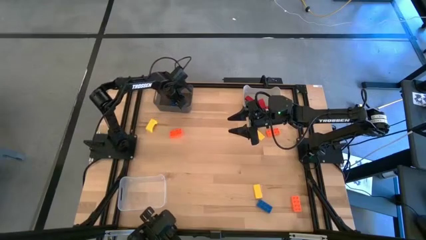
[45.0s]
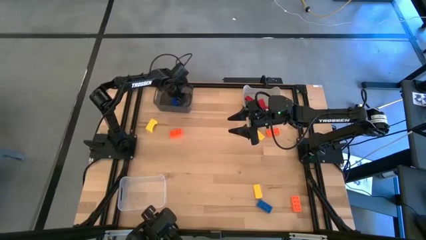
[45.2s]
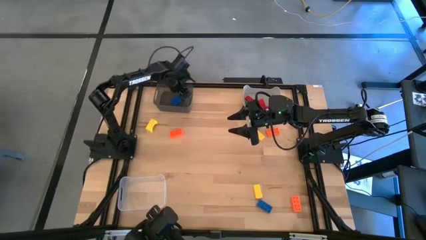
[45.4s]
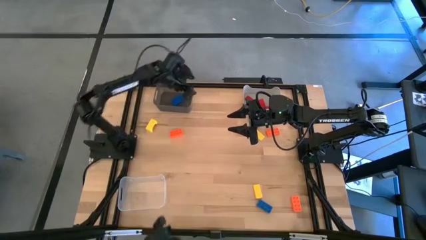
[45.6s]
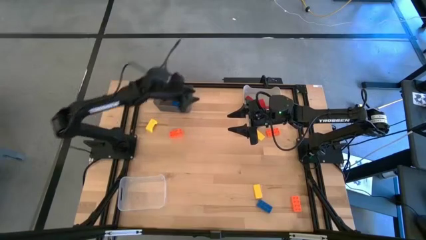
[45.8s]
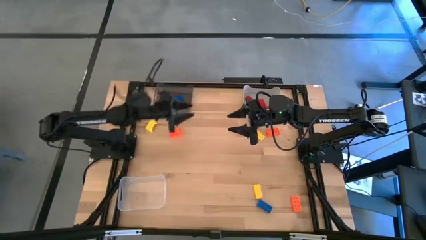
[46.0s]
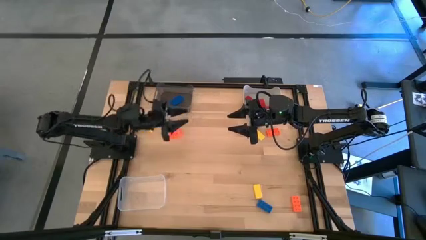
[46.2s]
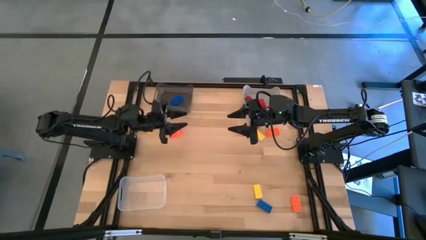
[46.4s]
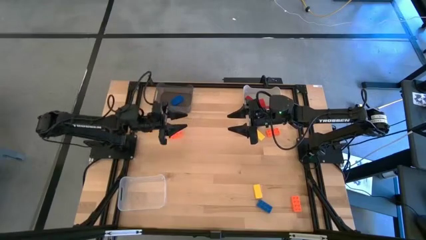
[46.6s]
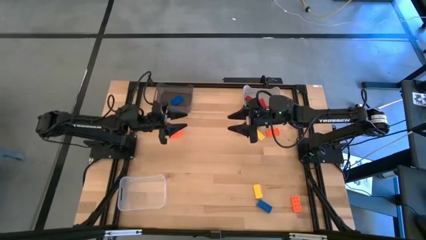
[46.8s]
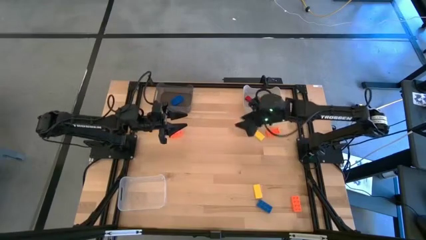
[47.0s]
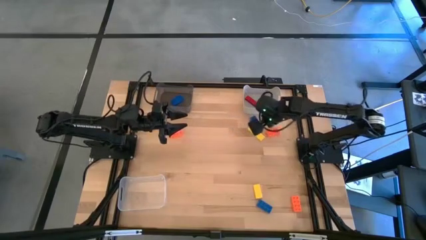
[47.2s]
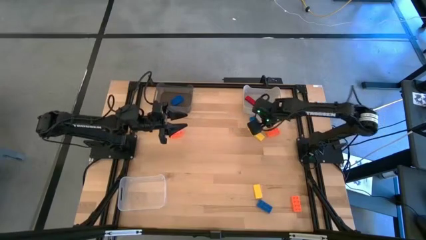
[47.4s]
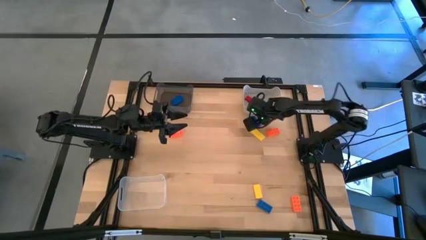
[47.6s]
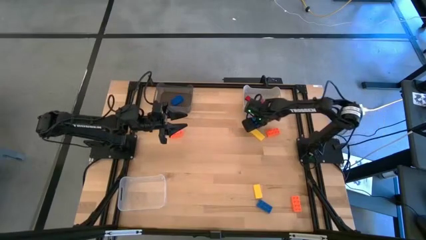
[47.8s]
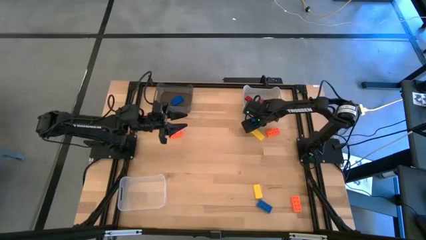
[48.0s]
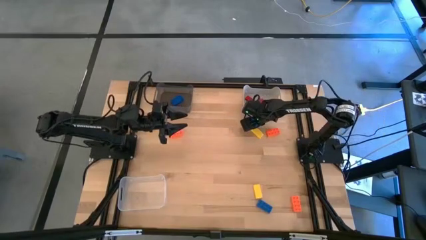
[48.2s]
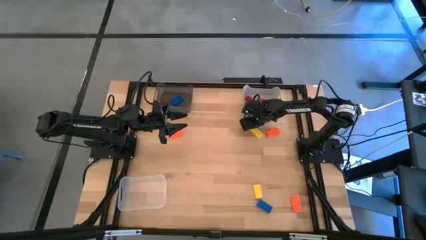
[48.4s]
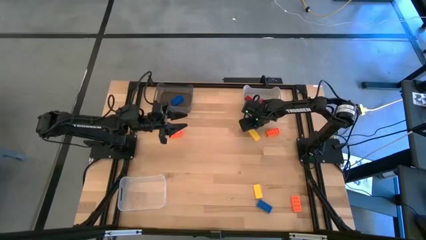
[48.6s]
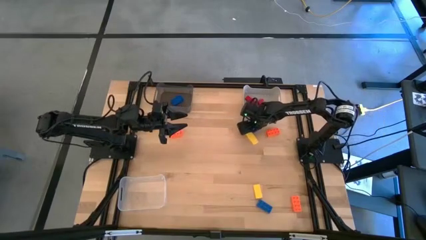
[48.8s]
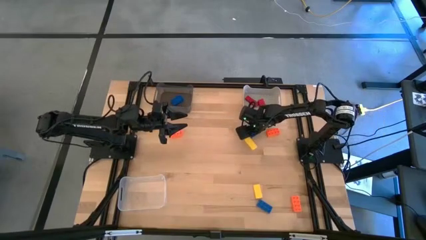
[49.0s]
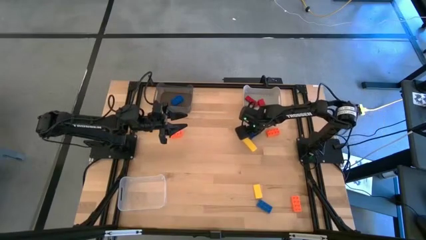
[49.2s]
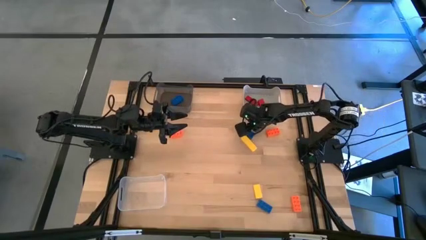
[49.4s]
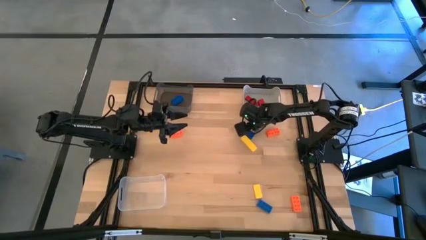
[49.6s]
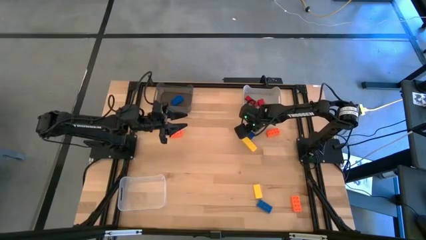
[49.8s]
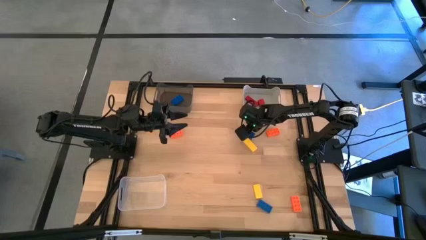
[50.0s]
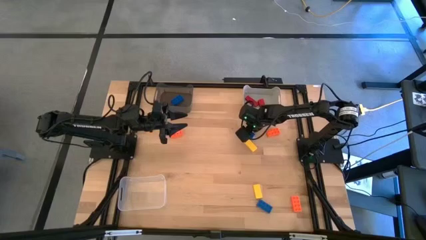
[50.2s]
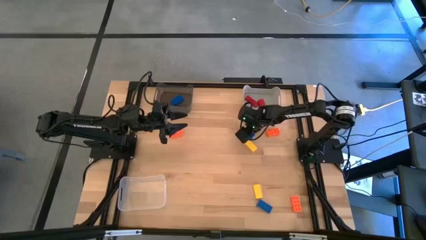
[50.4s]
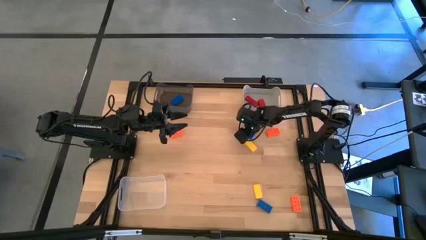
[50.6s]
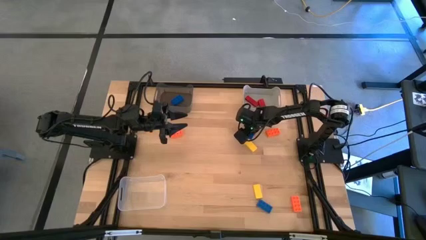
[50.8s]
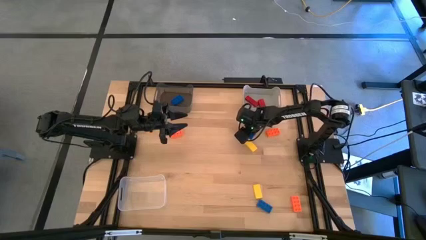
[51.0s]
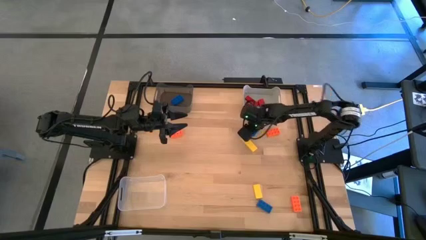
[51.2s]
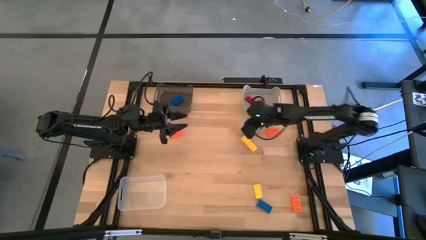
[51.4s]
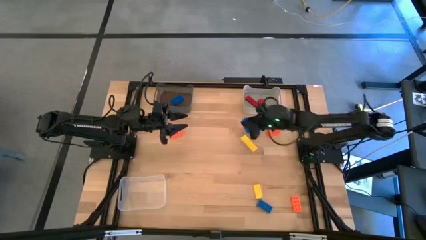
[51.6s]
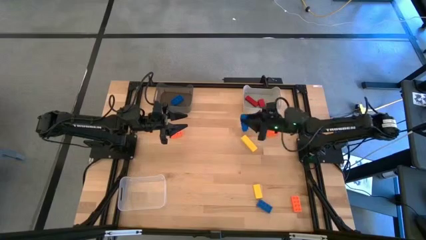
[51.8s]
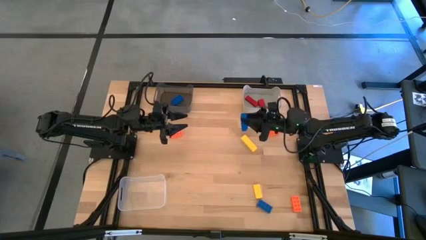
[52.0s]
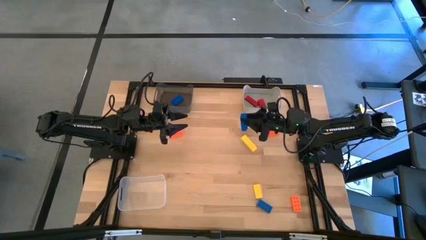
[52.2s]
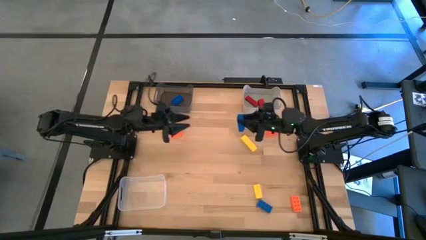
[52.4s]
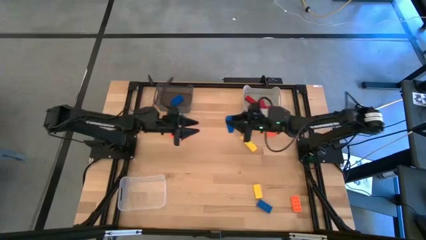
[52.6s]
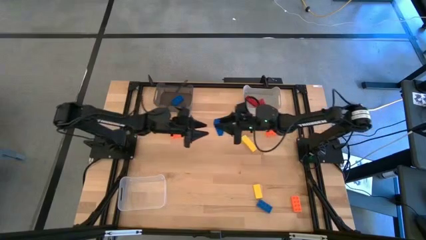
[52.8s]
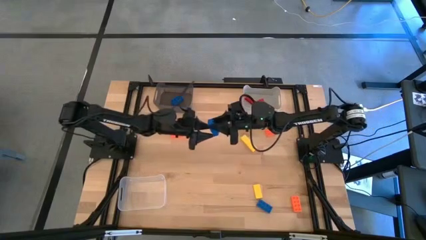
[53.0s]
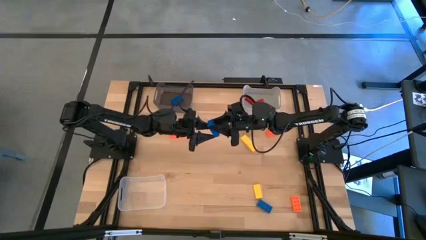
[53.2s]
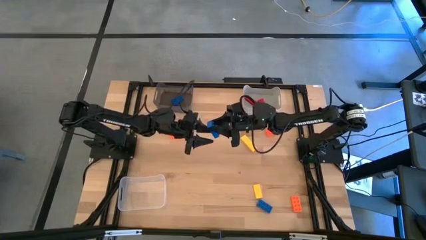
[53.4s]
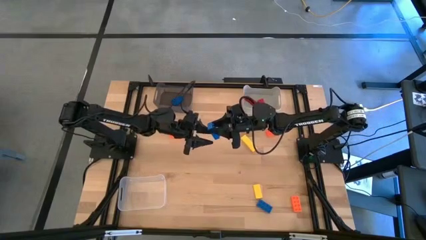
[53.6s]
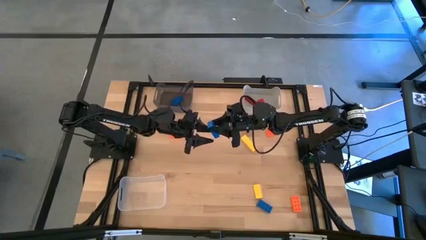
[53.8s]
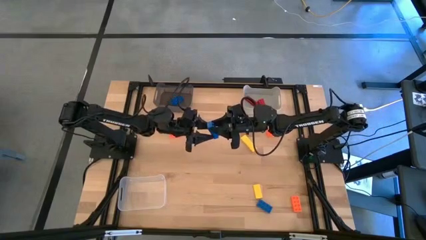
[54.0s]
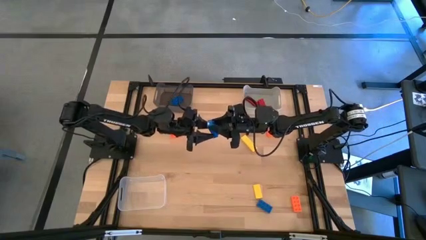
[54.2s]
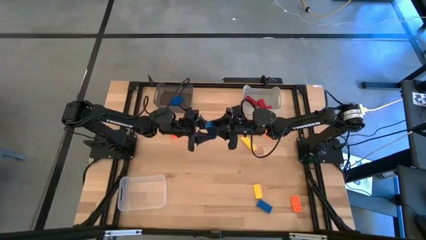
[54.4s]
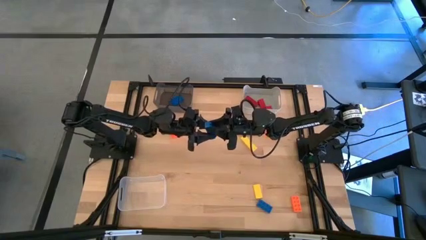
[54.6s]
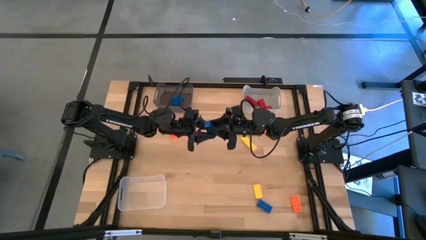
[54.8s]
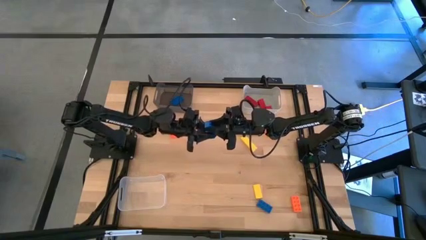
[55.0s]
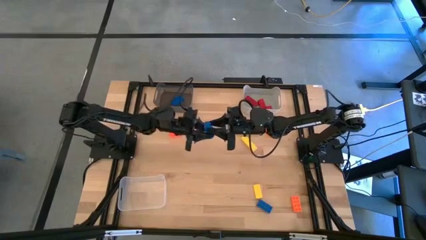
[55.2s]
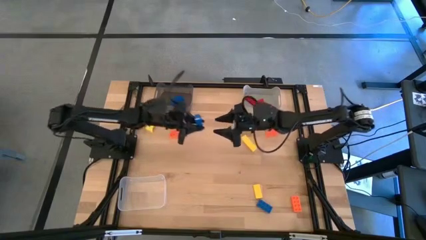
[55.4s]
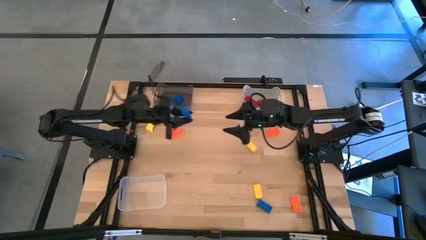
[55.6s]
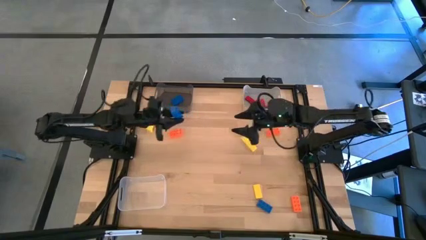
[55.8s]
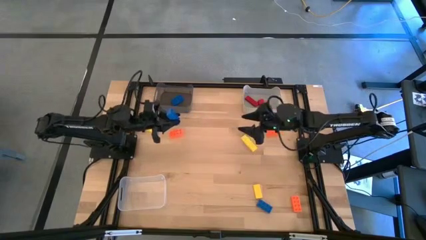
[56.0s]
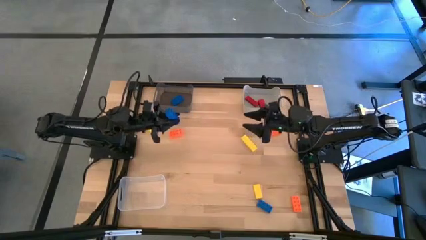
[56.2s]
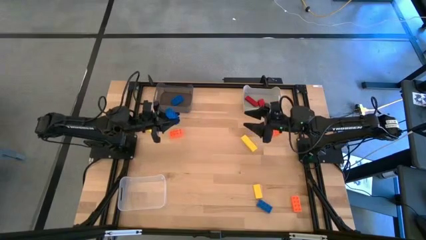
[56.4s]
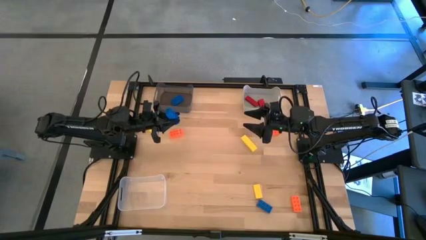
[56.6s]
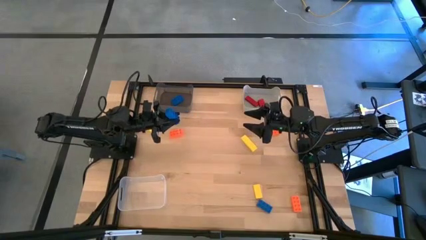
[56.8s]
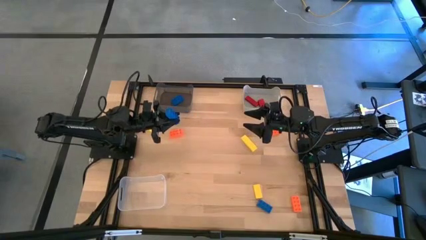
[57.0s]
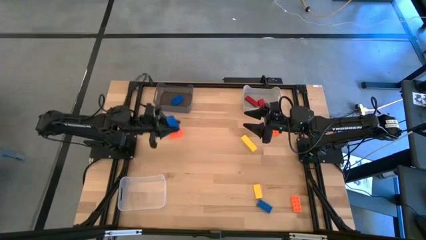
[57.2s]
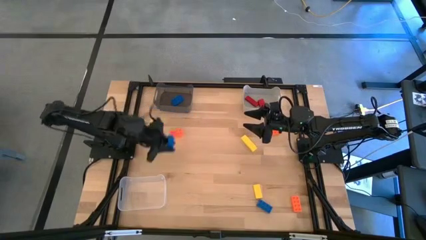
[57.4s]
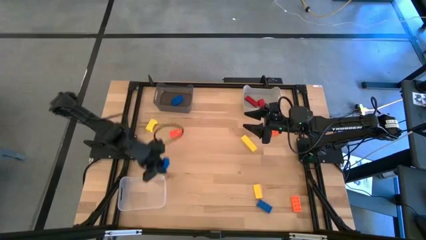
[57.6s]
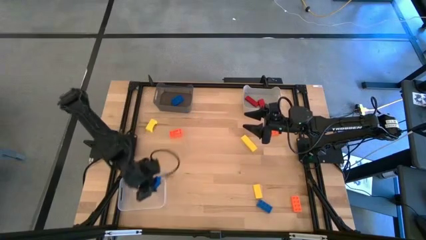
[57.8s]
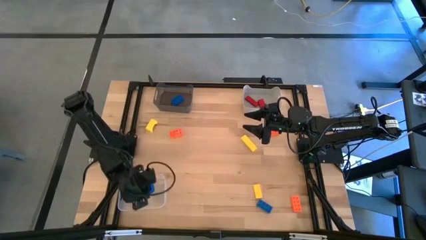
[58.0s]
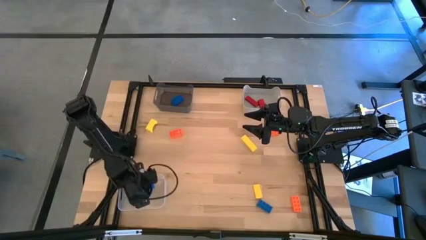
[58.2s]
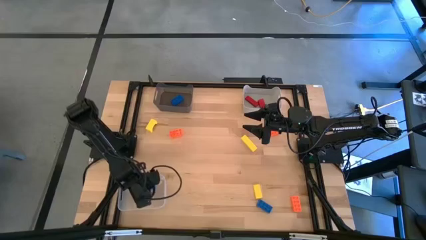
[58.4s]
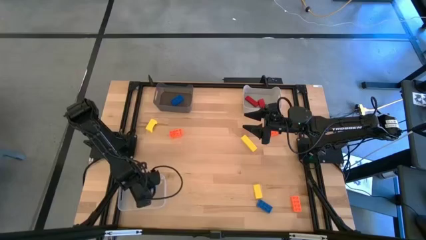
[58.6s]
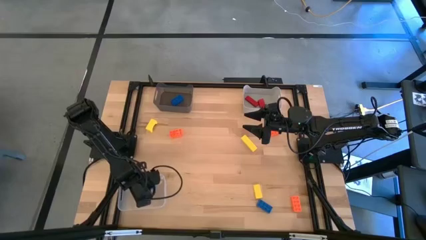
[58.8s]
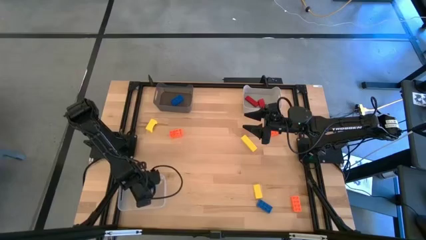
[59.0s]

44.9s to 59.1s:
Task: Sort & place blocks by color
Put the top blue three stud game piece into the black transparent bin
